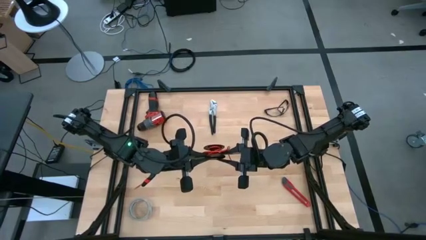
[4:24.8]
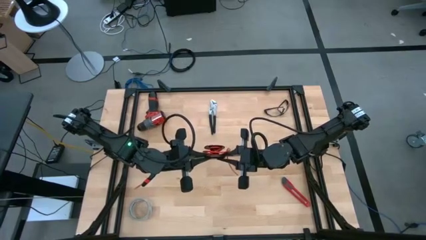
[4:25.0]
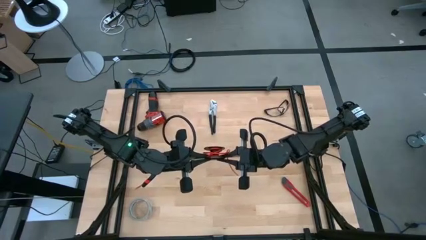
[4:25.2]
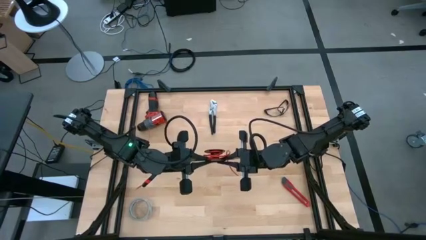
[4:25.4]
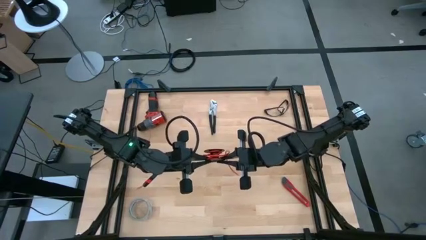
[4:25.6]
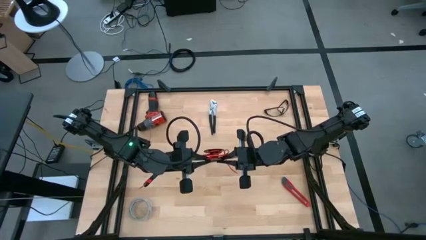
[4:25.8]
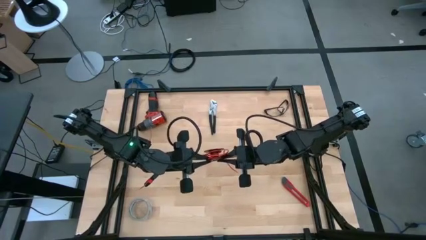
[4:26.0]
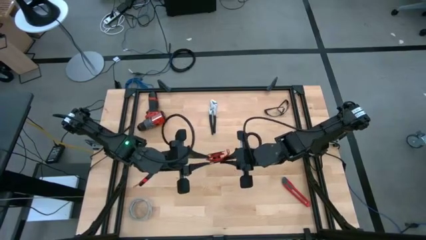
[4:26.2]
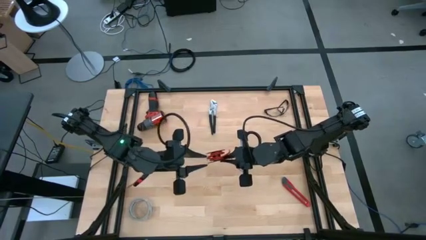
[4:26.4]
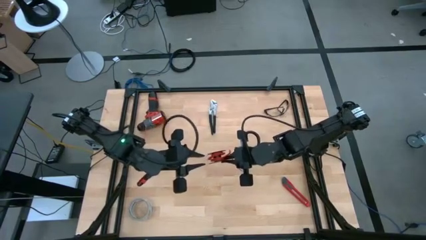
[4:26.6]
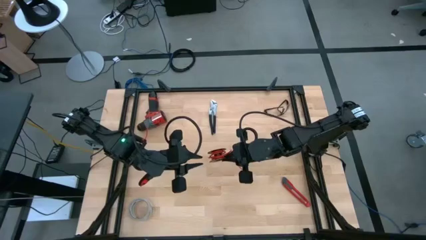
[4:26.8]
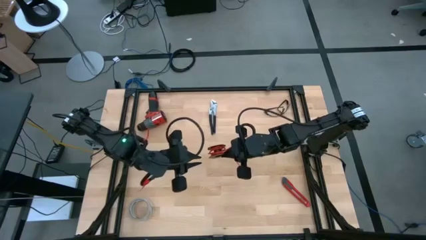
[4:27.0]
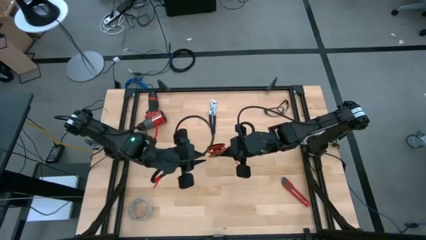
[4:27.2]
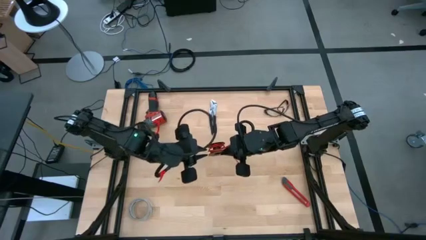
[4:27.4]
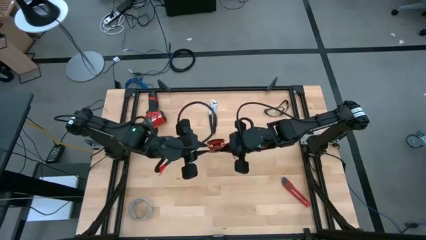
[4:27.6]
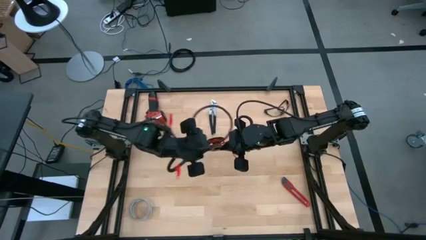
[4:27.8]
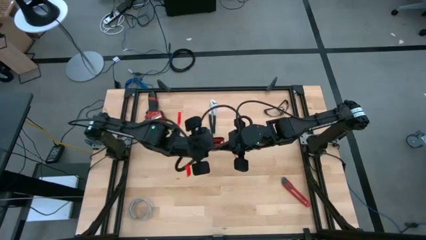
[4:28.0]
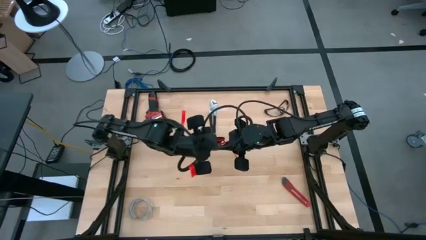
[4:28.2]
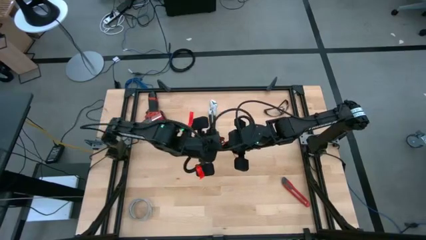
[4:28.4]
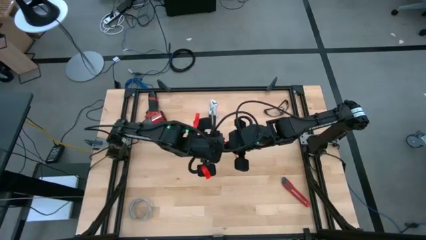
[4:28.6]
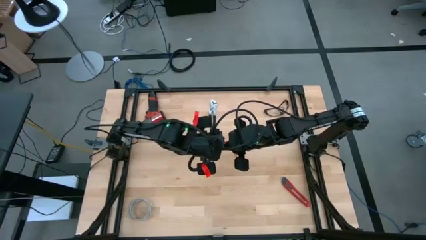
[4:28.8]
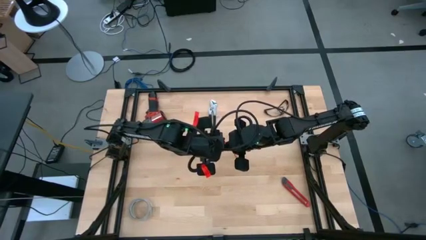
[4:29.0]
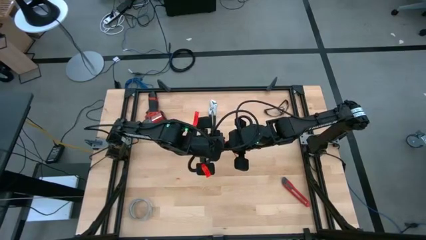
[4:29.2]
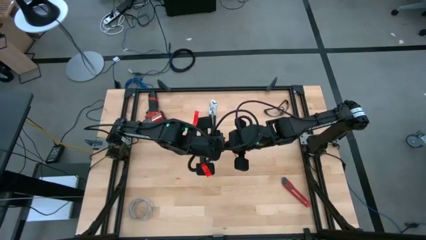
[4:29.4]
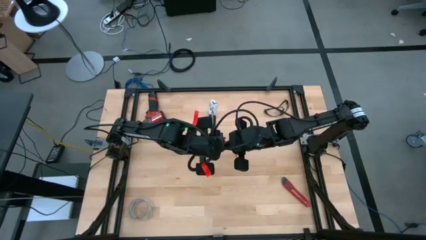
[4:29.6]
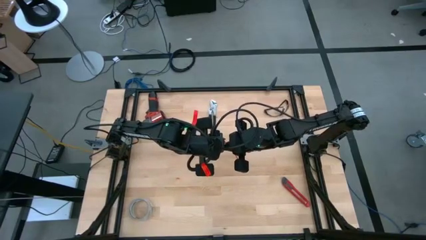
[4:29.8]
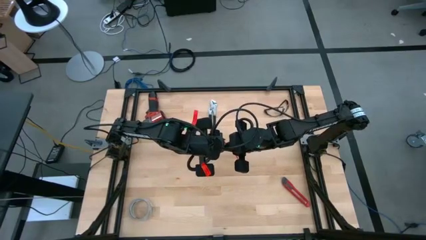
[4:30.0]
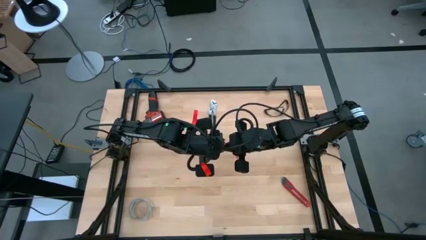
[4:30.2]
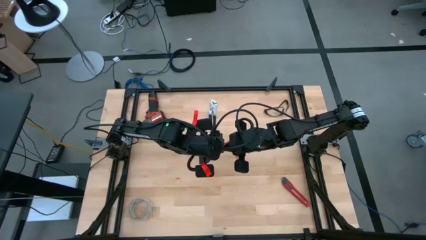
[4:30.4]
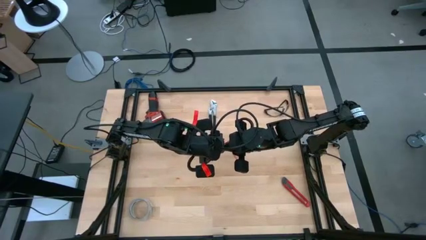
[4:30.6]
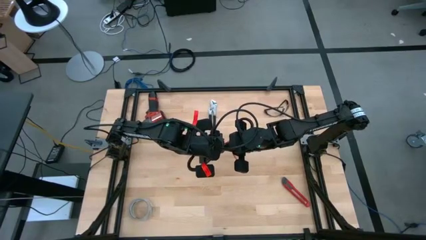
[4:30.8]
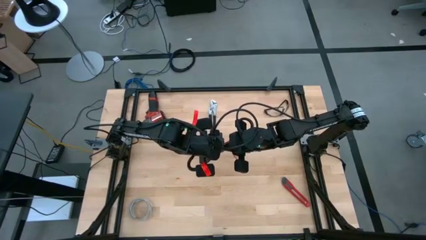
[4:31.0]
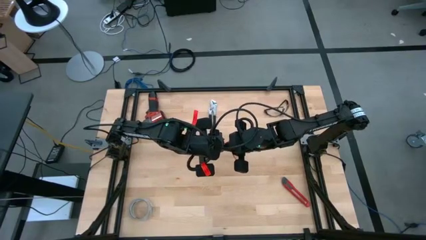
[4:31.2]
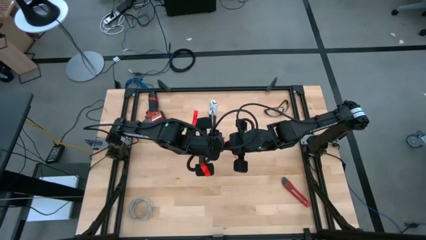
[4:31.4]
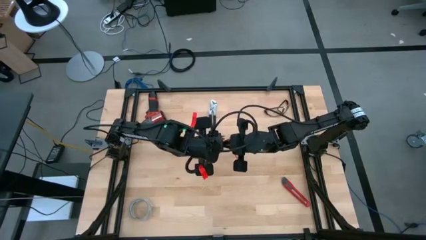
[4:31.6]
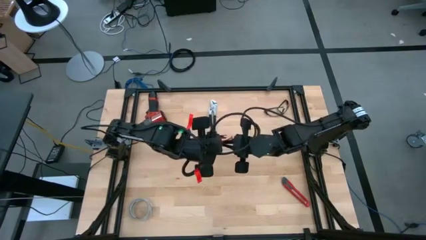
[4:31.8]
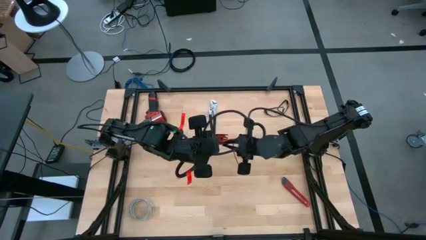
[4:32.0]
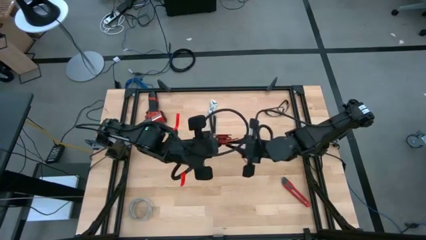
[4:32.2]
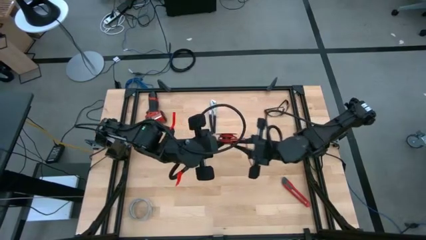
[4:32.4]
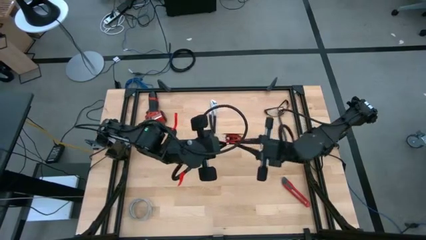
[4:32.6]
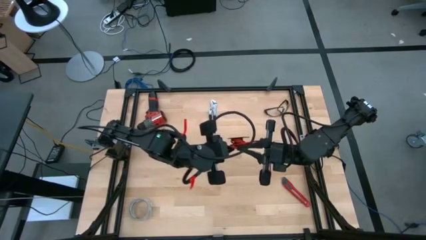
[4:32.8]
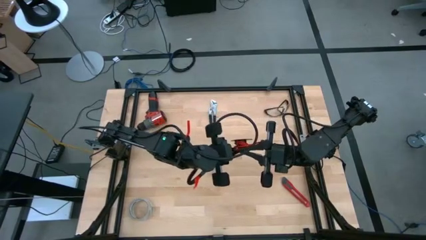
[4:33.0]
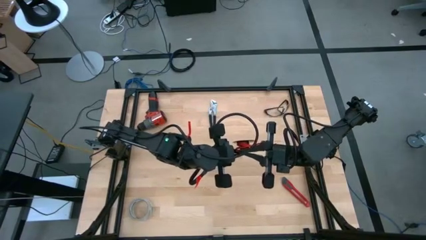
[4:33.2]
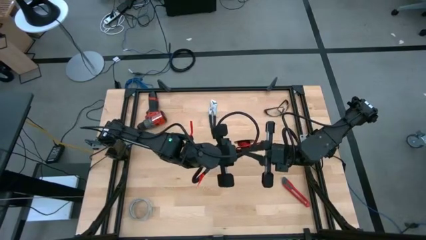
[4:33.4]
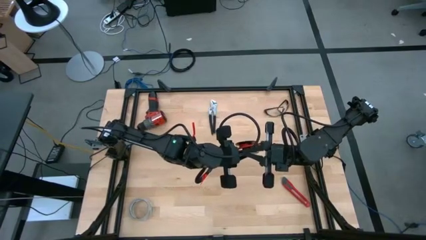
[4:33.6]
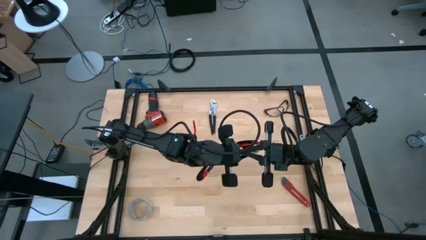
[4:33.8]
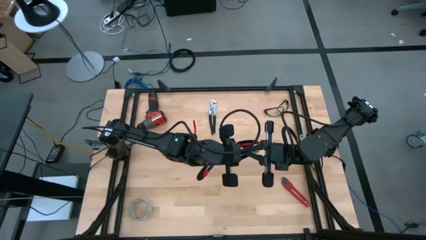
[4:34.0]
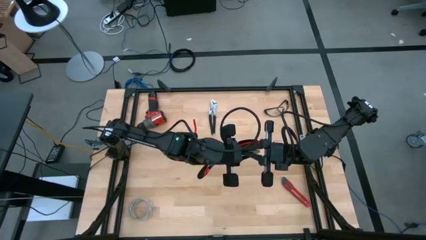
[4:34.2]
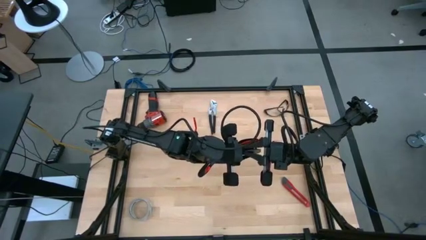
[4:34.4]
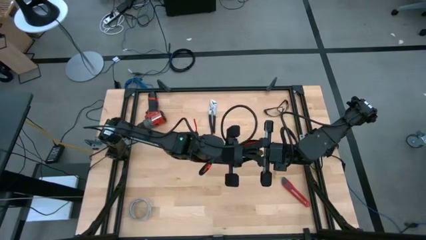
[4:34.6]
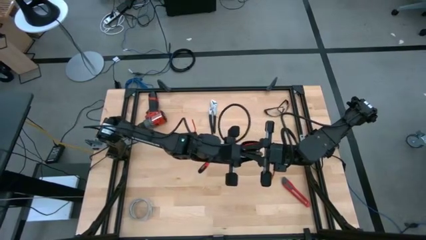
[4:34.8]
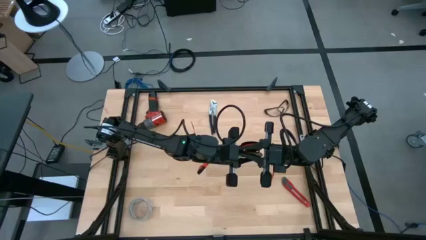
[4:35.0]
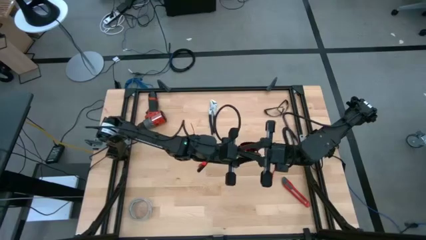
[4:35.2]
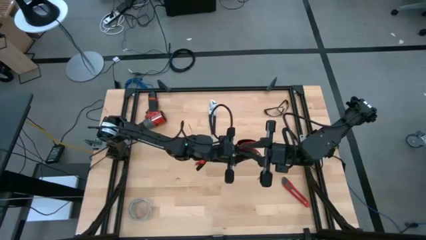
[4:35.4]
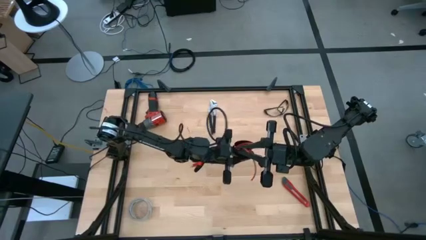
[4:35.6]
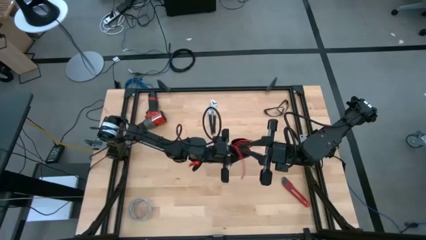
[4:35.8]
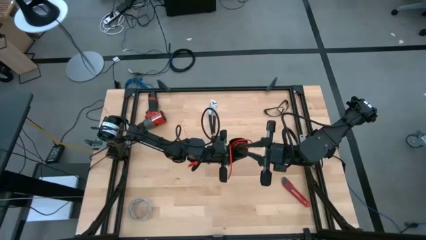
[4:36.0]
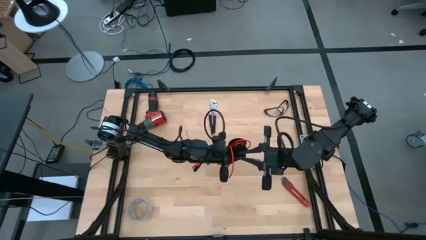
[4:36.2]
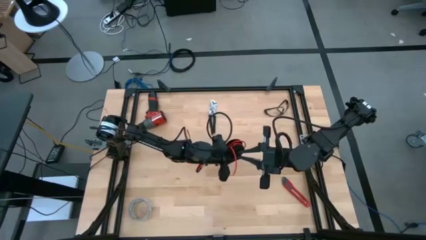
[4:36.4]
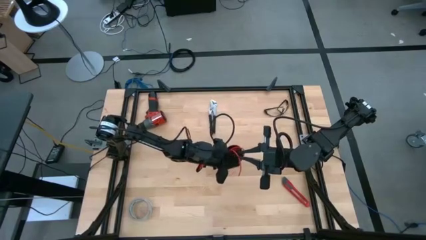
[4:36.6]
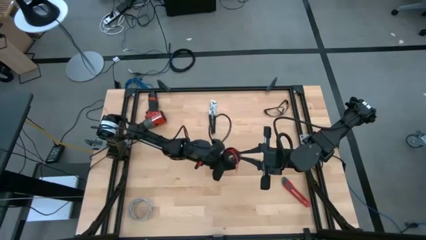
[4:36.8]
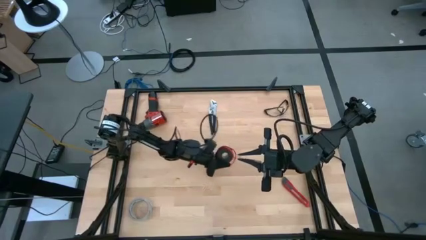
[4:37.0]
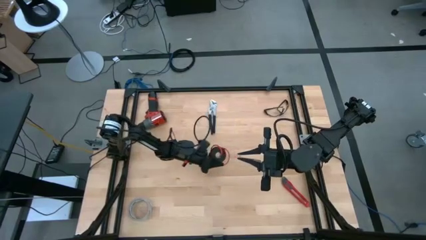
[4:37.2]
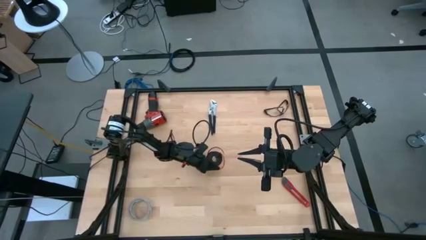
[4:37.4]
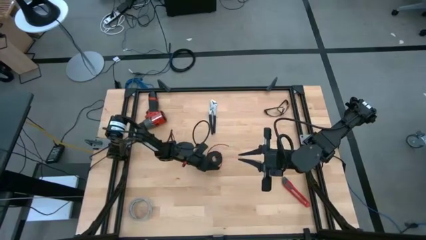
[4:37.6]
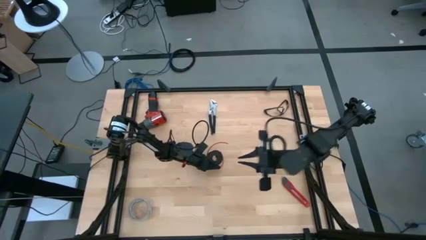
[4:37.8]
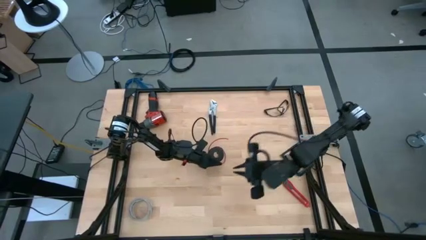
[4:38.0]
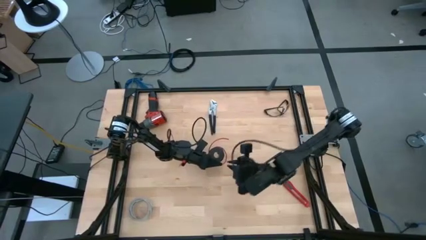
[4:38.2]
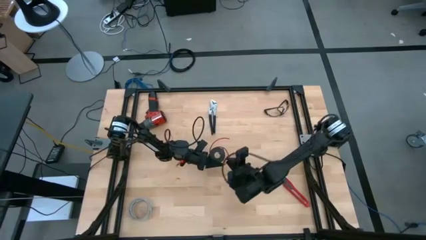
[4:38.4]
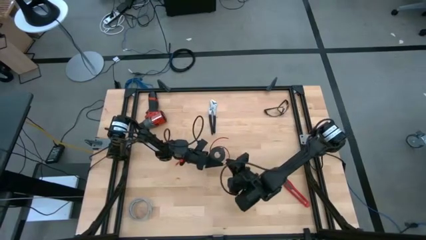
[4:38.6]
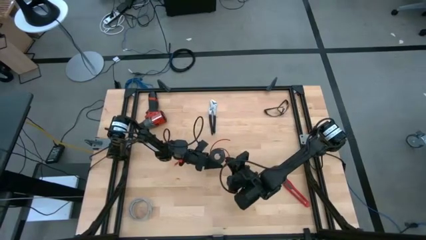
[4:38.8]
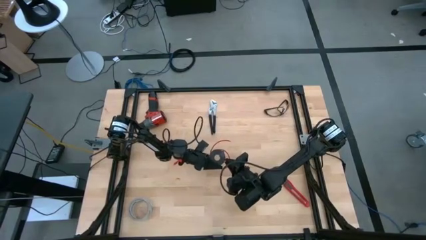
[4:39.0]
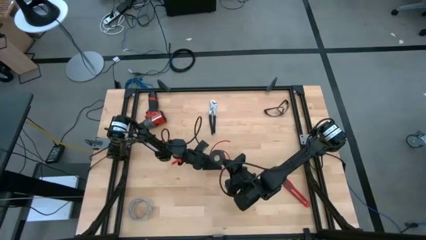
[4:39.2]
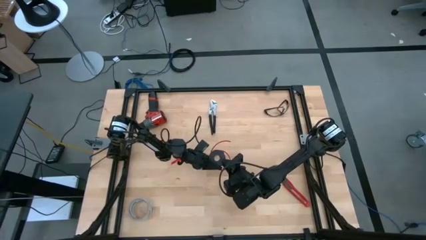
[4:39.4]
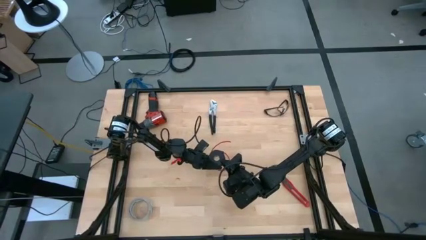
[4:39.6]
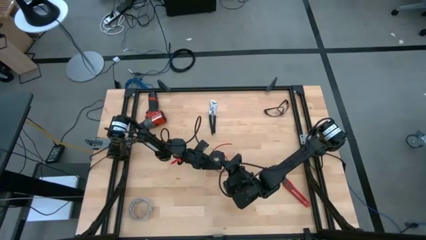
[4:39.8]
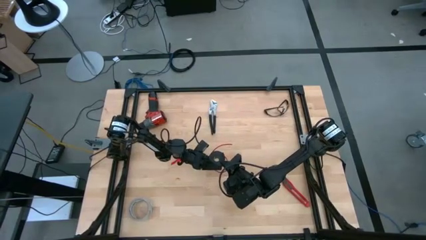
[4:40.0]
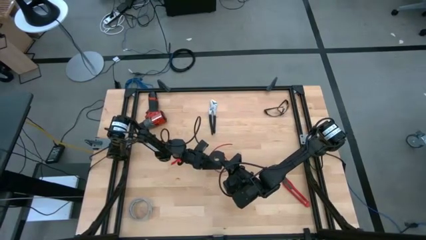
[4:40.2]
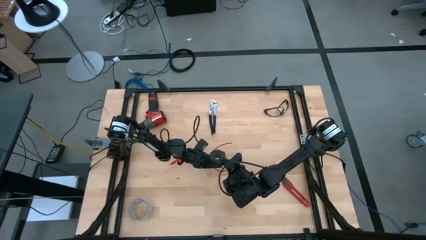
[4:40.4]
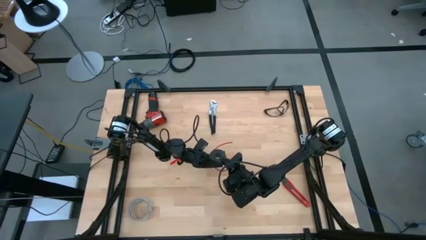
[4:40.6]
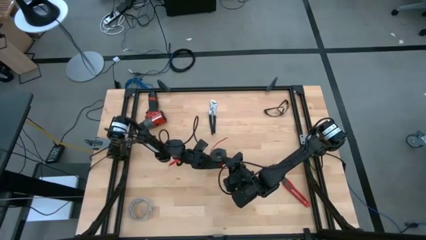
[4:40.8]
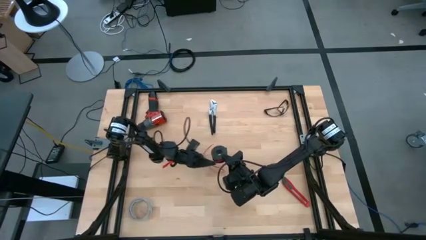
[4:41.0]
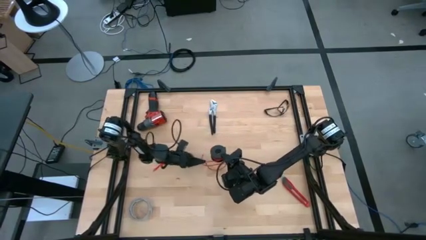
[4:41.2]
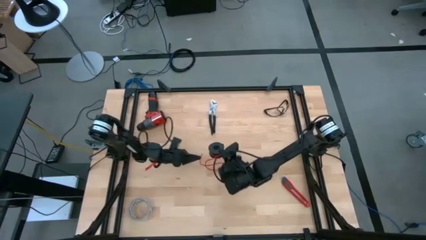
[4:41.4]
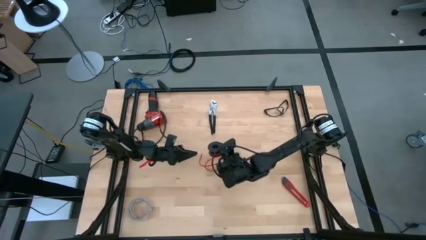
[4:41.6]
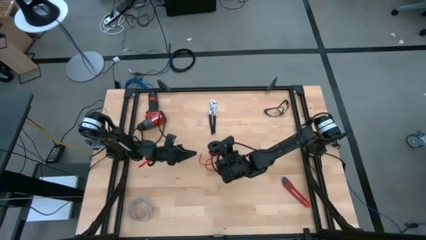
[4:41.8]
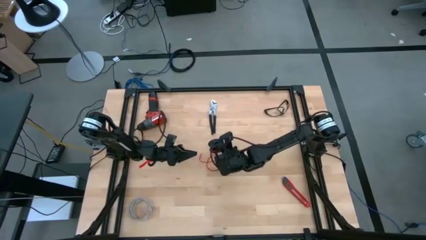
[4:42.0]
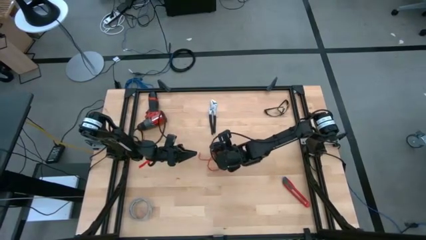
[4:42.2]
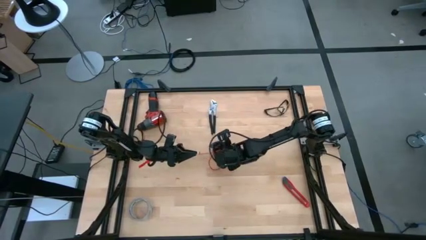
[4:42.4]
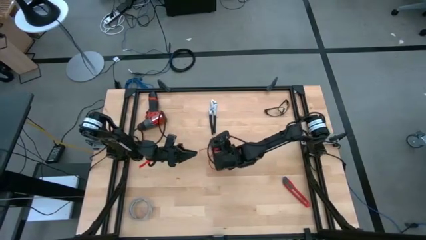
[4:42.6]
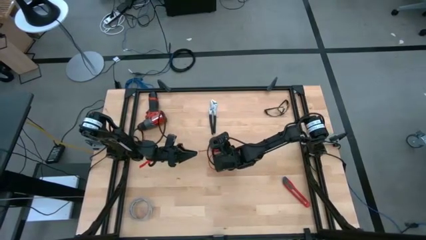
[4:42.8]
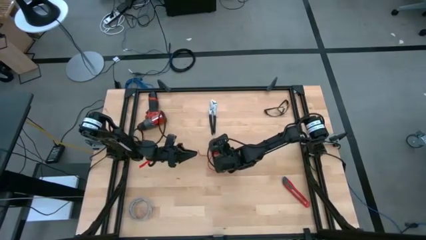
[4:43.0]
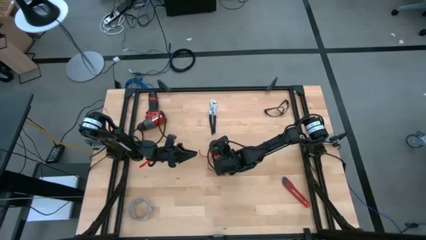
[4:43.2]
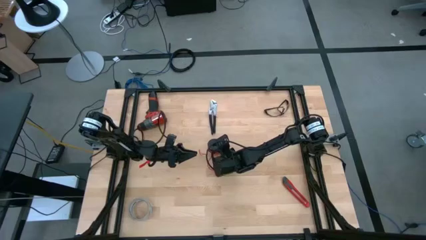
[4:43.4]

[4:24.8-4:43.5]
Task: Coil cords
Coil the red wire onto the black spool
